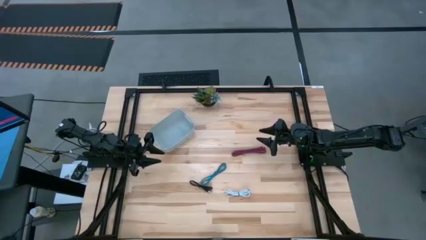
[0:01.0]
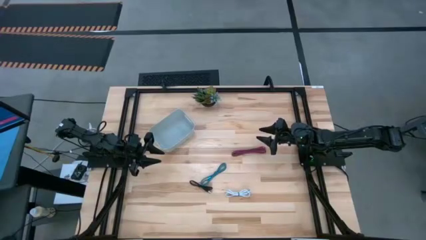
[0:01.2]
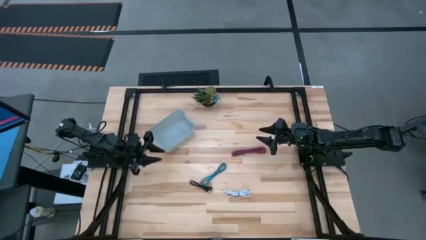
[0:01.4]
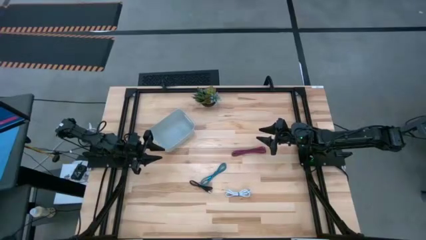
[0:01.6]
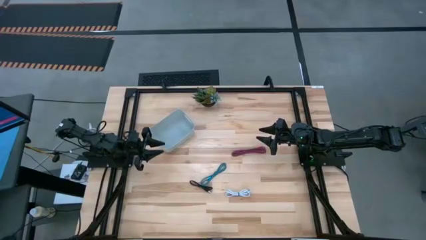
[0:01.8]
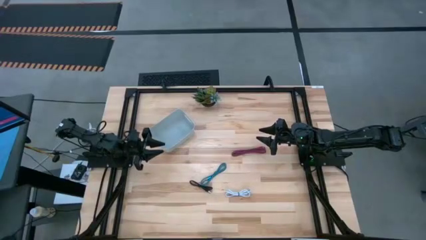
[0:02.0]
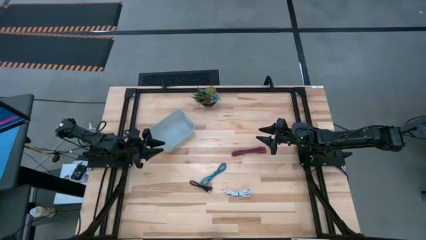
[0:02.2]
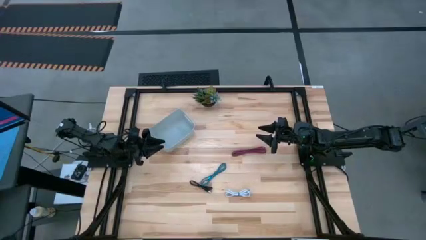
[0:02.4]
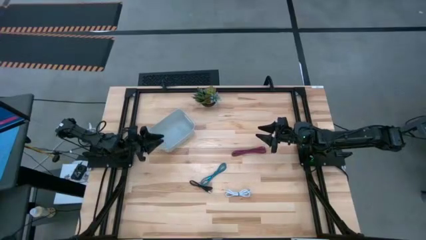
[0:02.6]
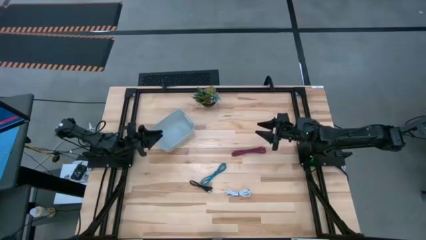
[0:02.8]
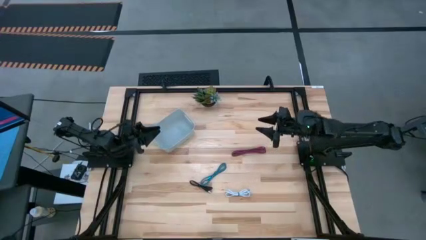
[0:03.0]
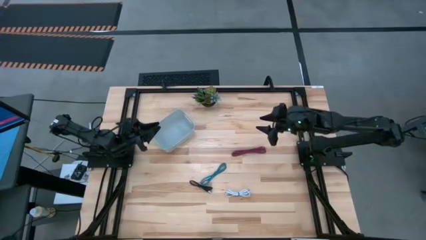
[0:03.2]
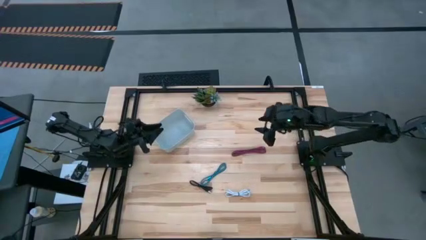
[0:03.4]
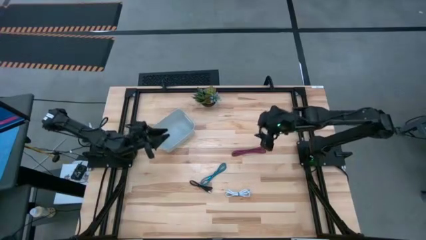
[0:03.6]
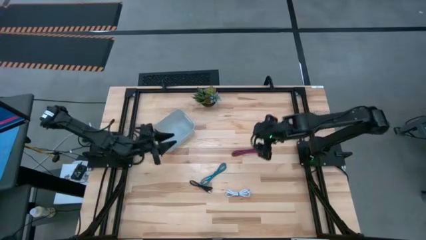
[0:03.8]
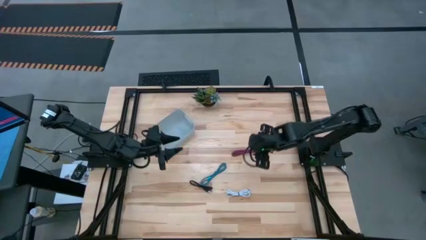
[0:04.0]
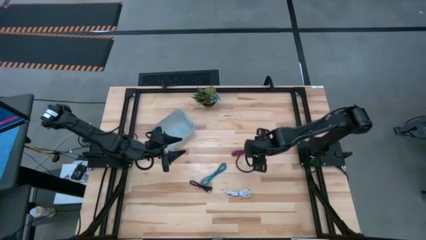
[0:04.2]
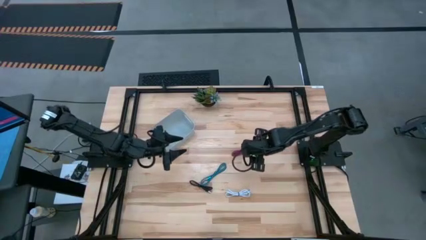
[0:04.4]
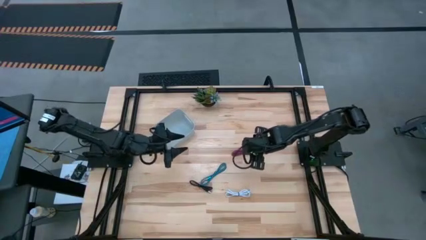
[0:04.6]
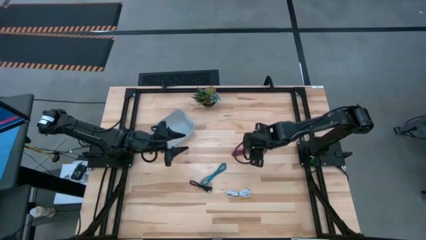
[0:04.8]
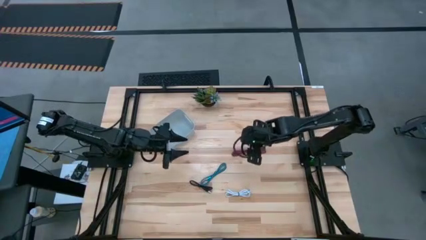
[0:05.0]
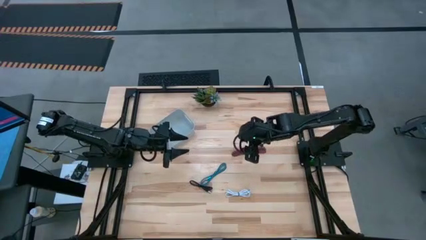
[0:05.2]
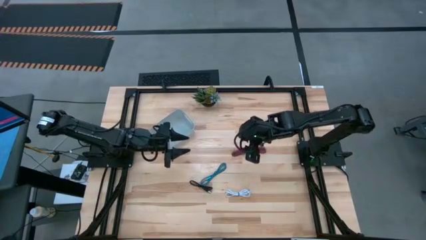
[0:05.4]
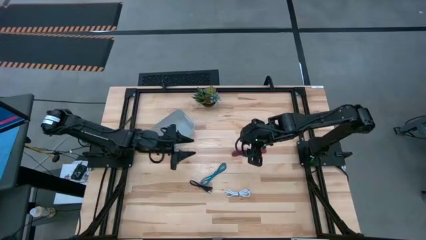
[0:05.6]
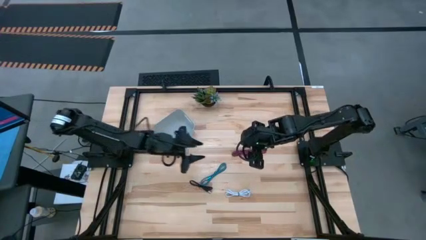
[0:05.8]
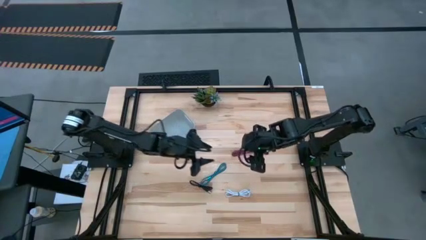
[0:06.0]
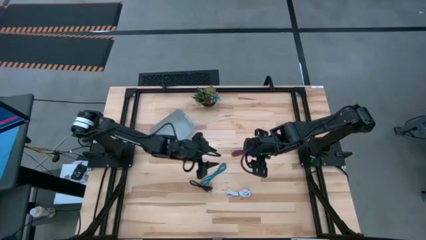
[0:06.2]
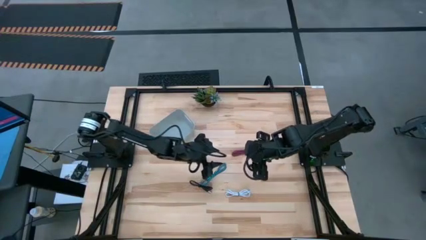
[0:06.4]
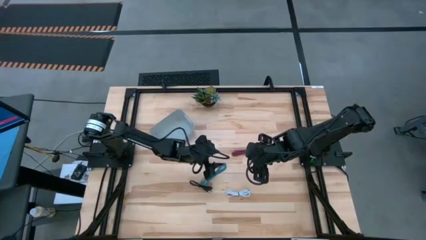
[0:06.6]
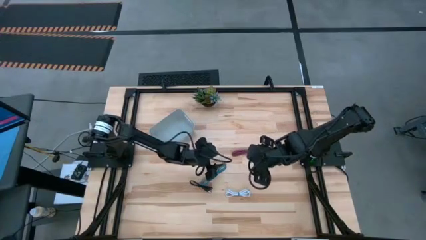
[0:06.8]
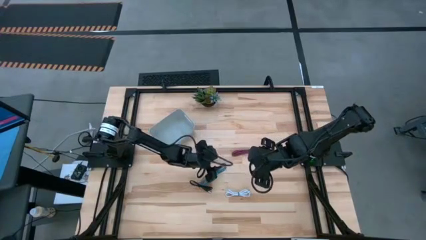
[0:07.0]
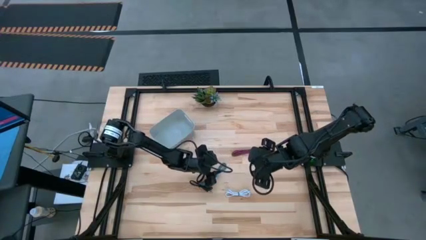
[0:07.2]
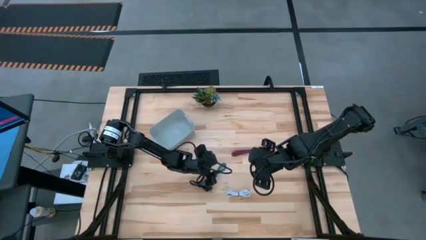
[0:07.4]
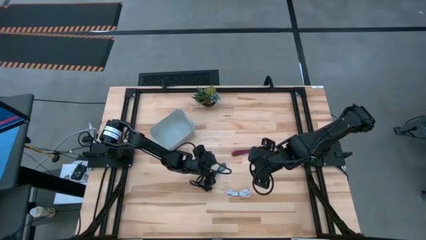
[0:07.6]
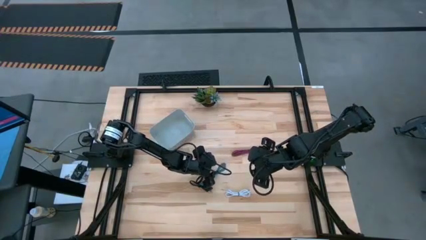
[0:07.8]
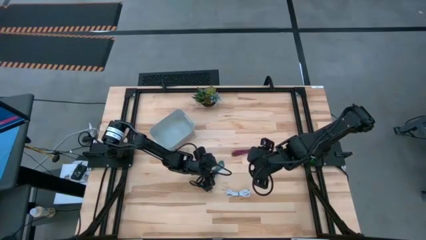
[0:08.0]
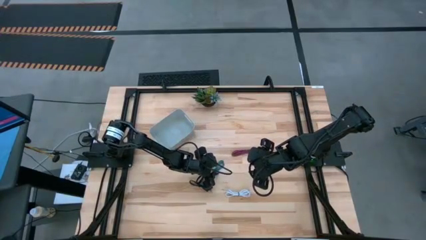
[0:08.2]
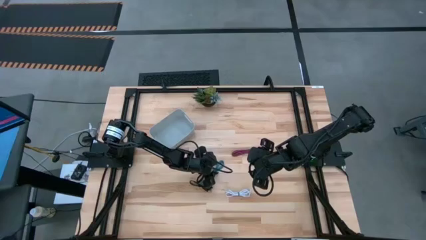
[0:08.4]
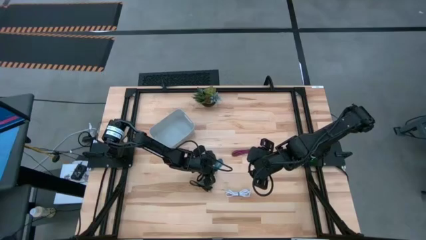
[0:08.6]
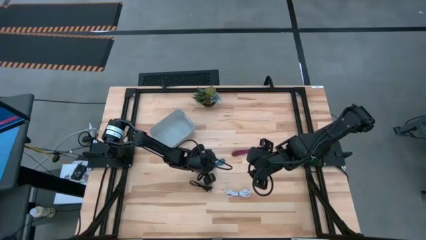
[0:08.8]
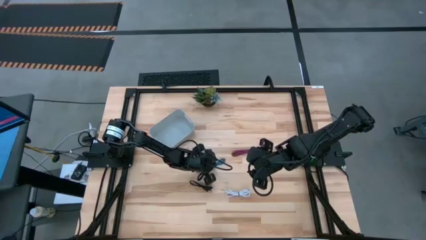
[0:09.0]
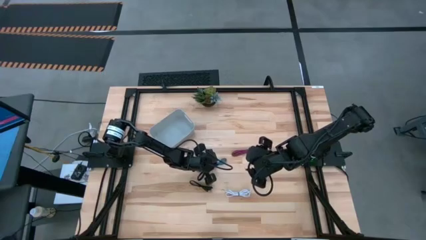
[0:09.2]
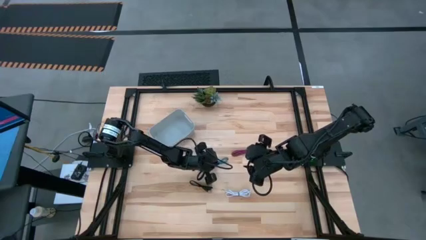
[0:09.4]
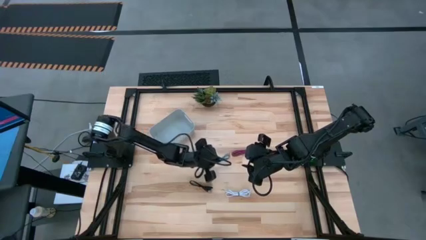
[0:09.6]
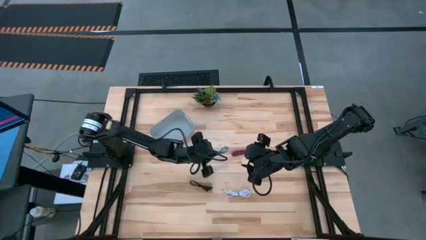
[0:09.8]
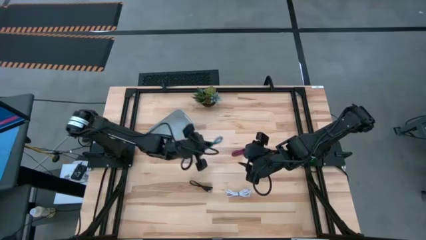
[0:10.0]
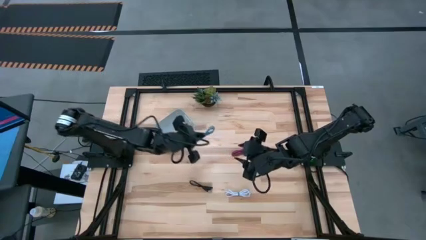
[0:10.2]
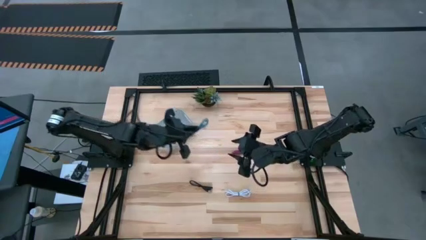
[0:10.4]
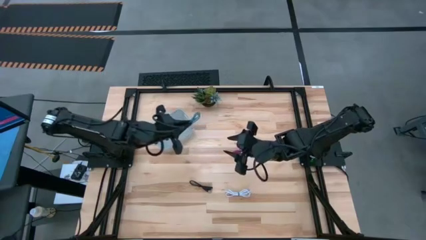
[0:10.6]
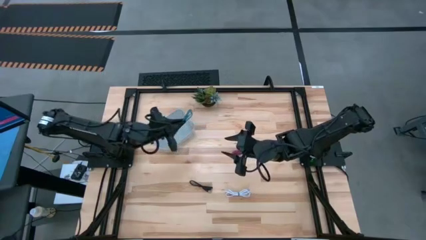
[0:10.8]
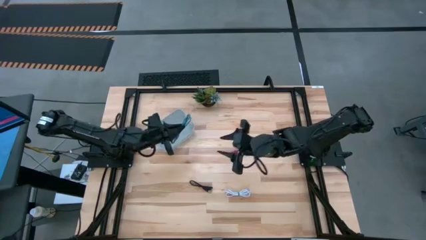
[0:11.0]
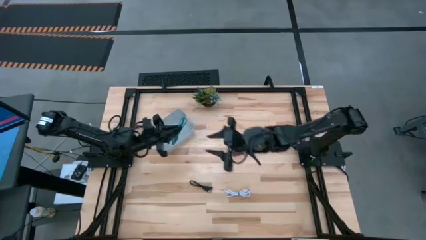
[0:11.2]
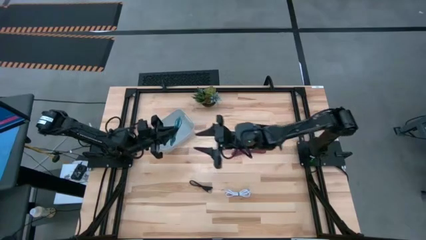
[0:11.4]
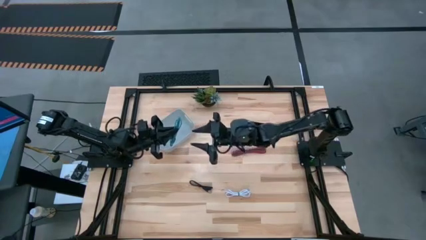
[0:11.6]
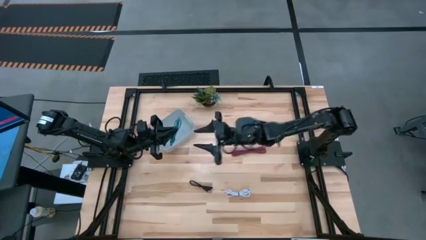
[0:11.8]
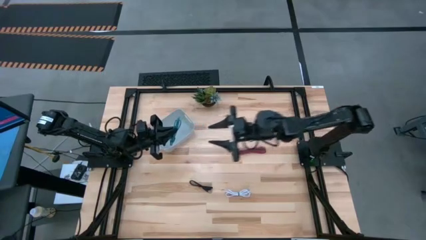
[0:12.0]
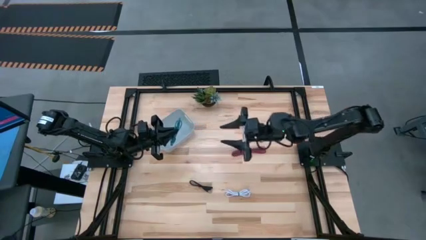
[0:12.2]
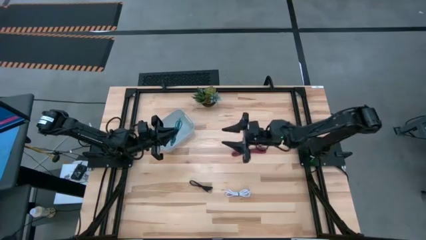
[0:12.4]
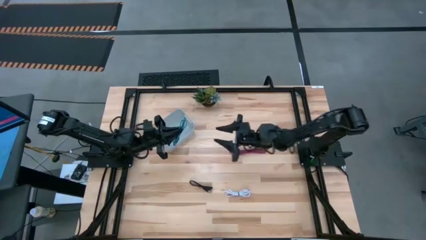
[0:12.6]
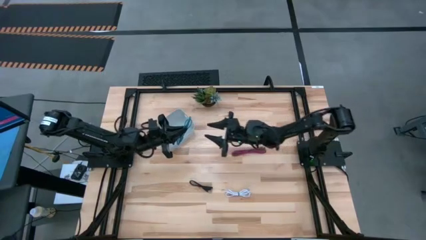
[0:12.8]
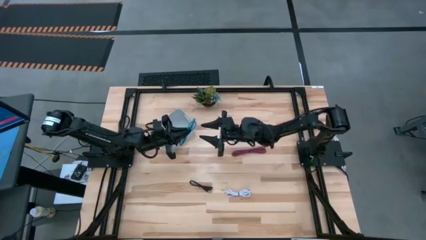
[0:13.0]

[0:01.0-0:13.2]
Task: Pick and place USB-C Cables
Put the blue charger cable into the white bin
